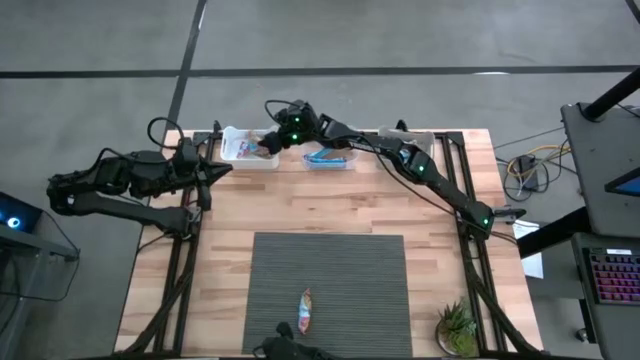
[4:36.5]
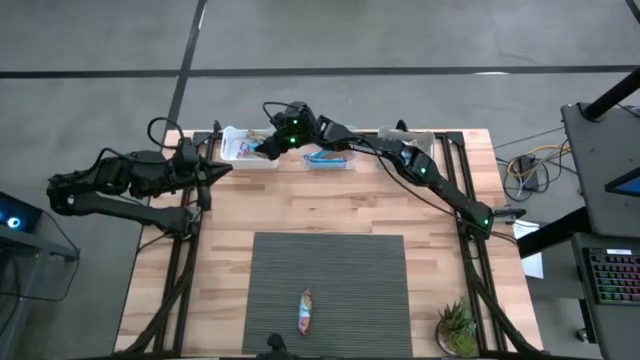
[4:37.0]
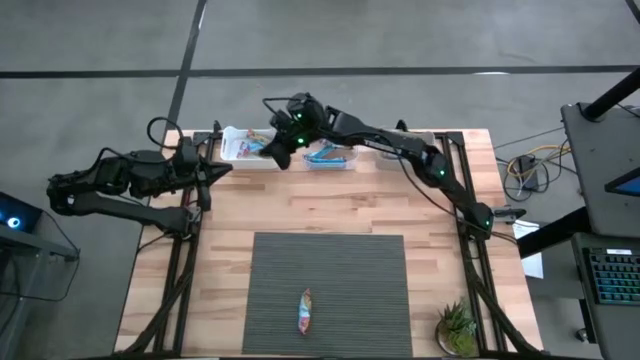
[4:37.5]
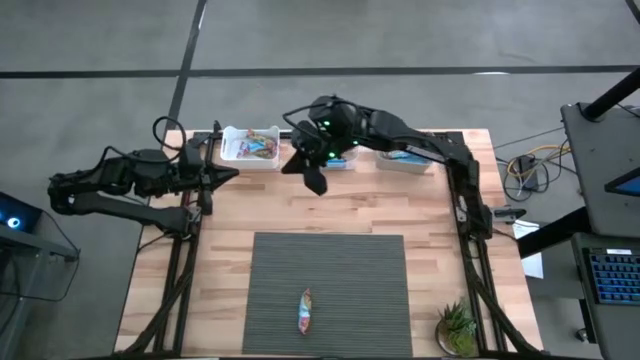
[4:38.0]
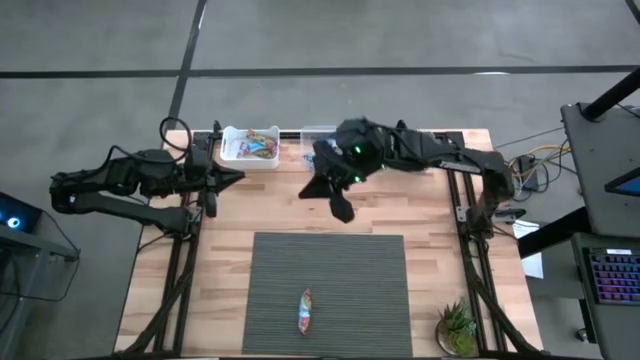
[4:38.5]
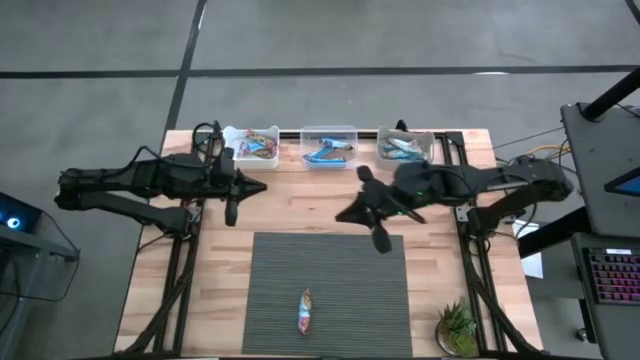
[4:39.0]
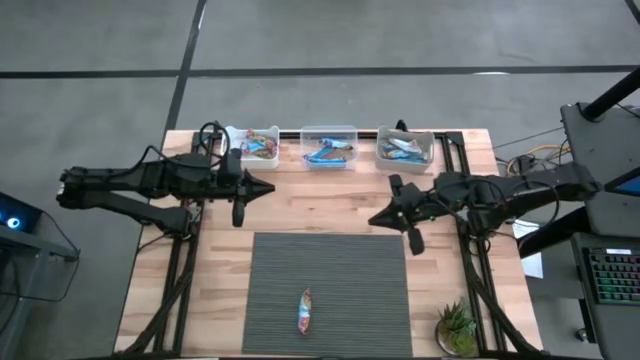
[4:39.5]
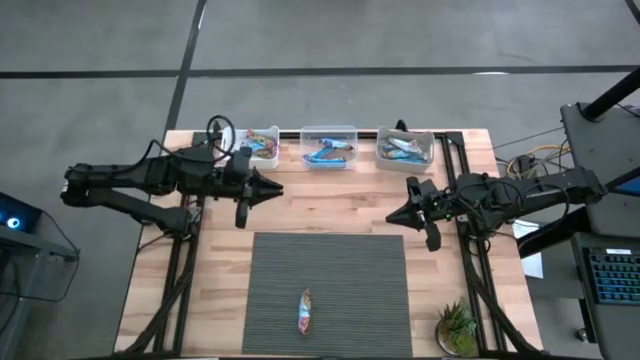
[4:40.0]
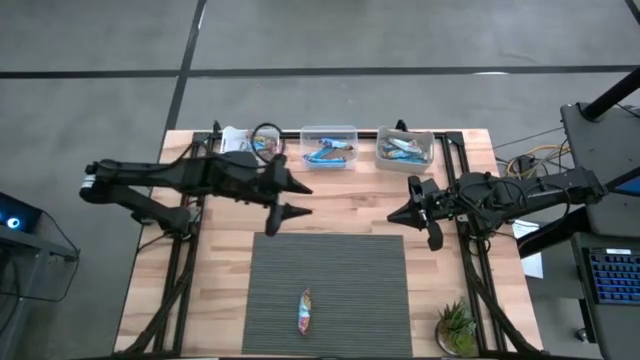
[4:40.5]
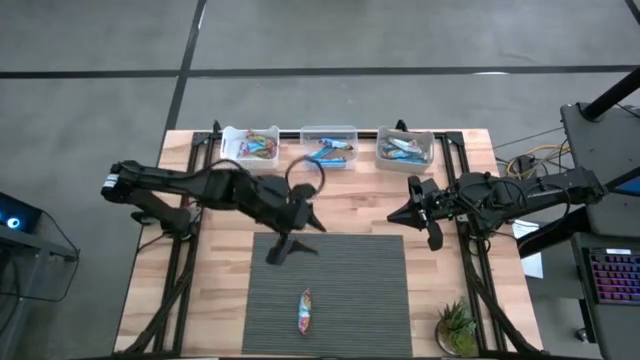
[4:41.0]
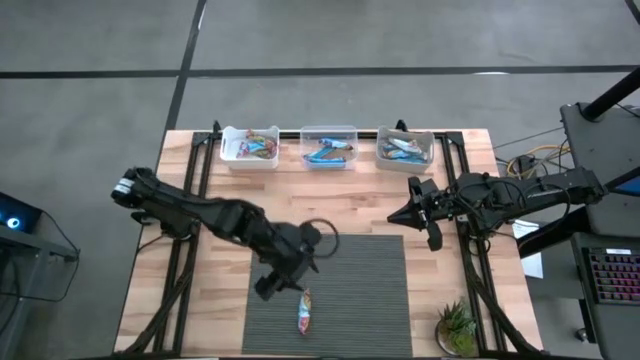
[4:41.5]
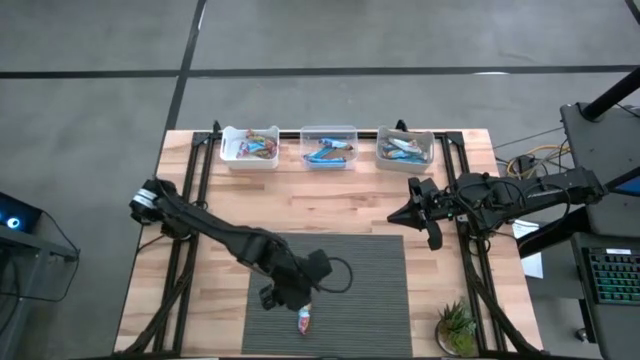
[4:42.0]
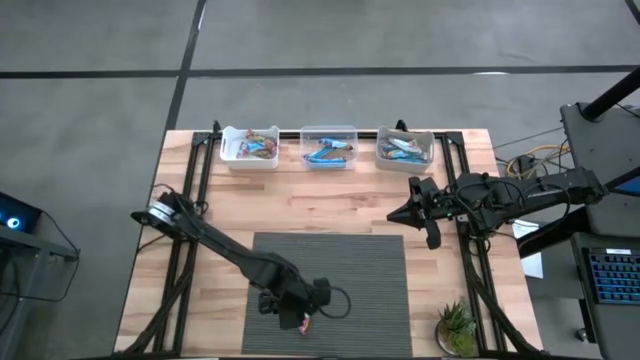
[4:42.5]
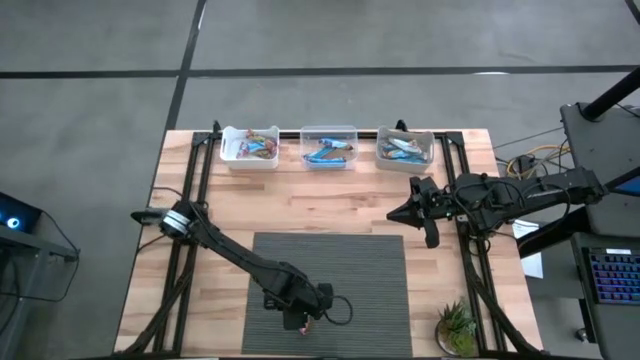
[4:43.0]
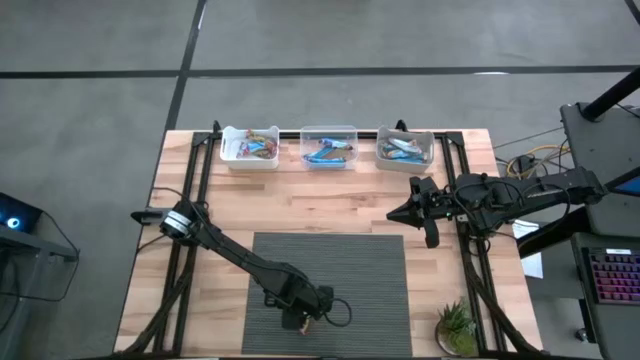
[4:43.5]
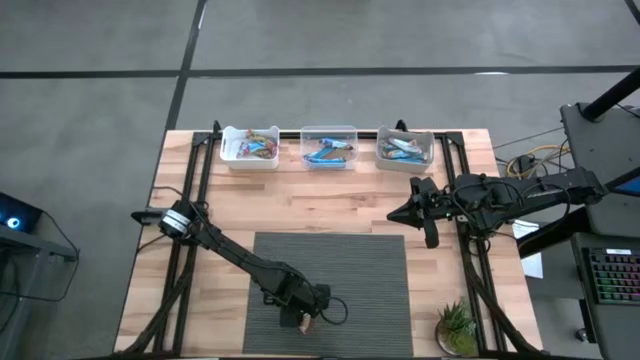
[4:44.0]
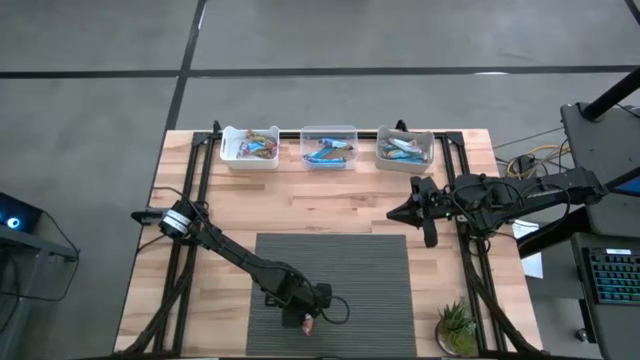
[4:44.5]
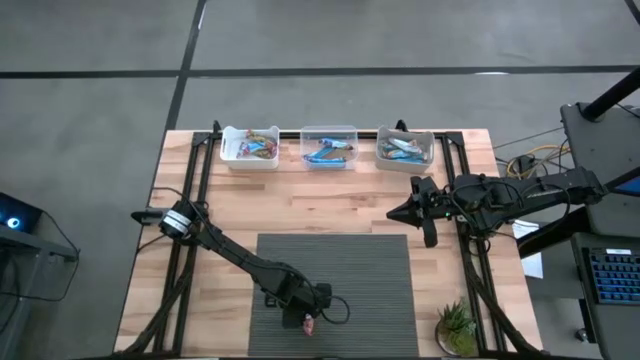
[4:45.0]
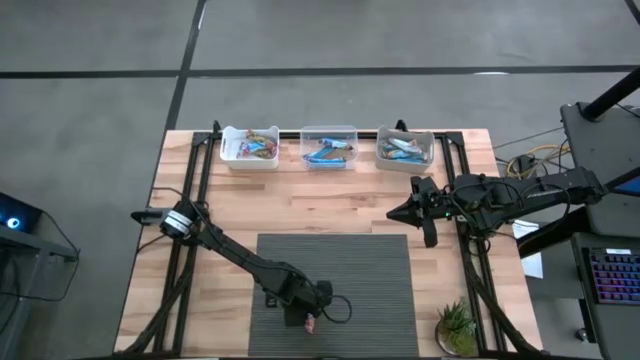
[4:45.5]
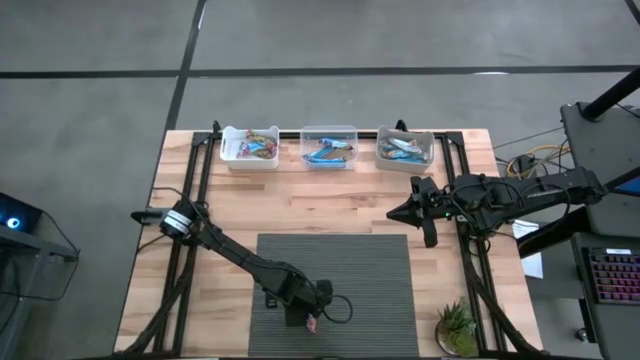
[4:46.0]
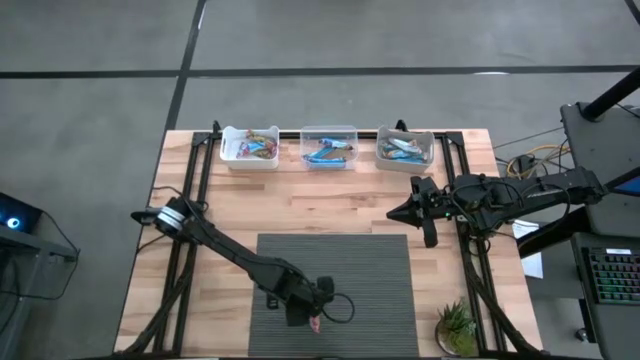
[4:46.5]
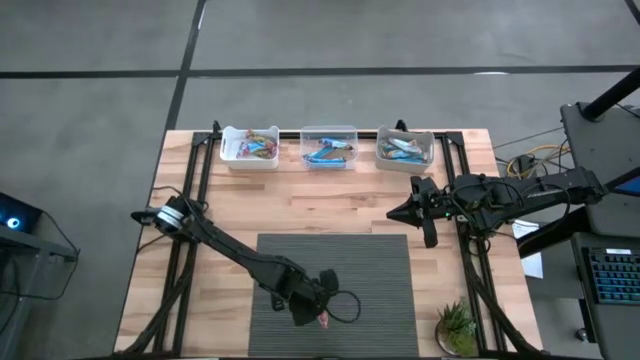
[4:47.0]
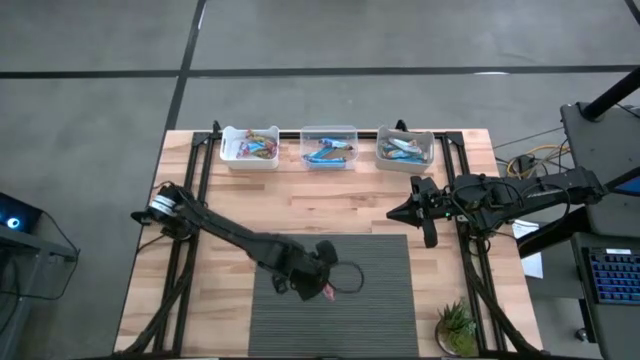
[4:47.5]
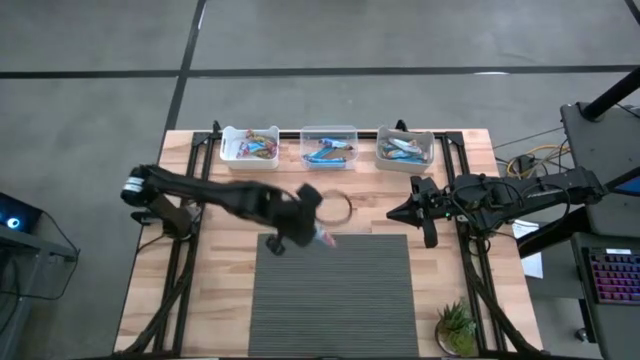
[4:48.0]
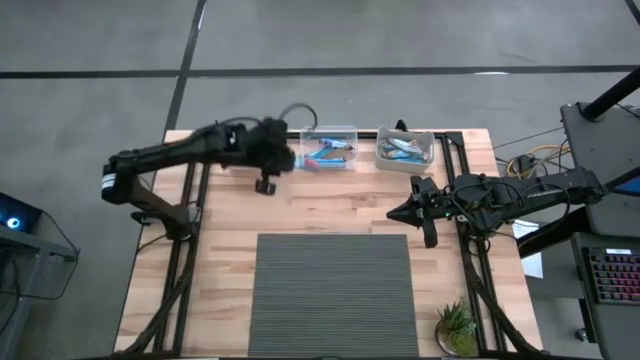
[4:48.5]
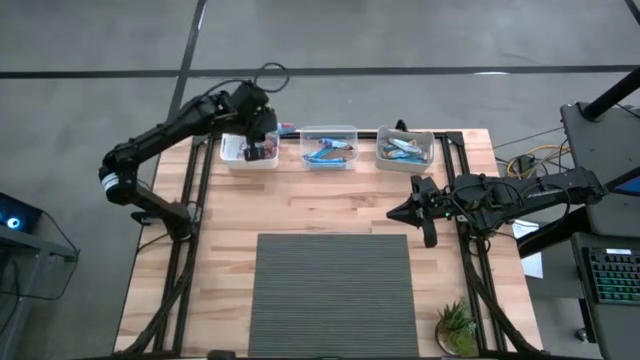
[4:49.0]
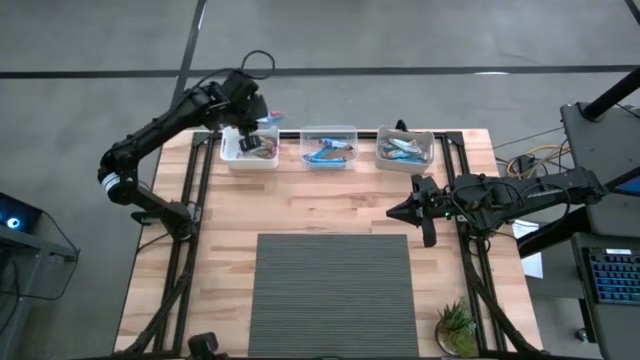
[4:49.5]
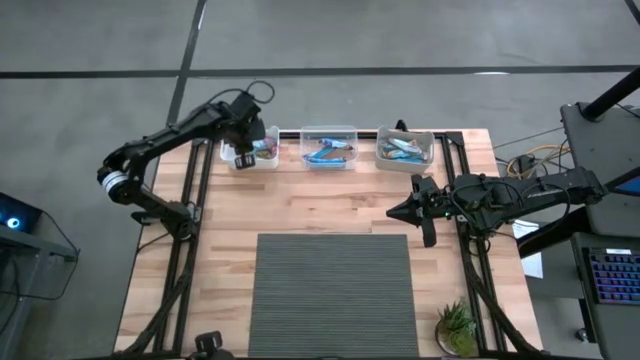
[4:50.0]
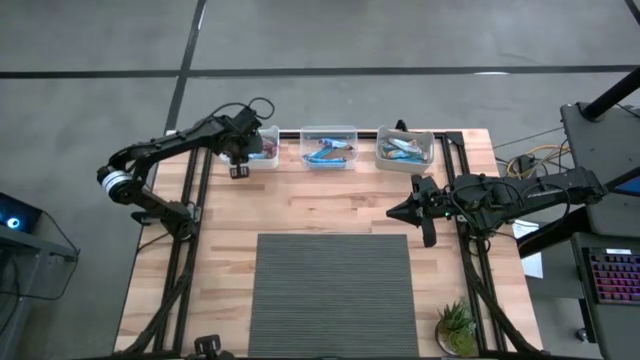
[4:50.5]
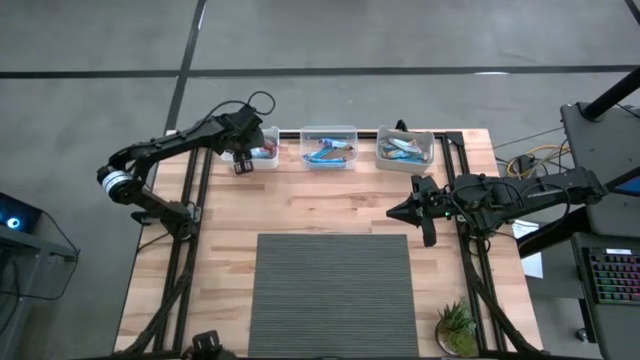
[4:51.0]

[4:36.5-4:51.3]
Task: Pick and place Granola Bars by type
Put the red granola bar into the white bin

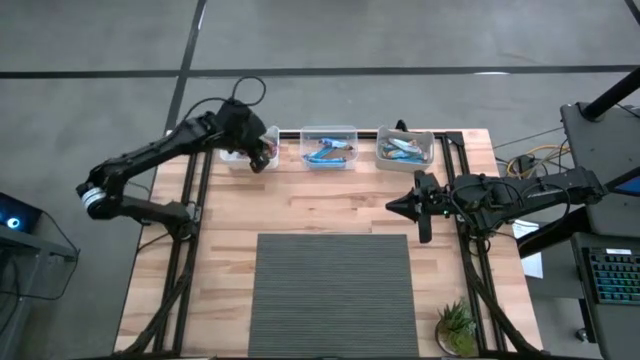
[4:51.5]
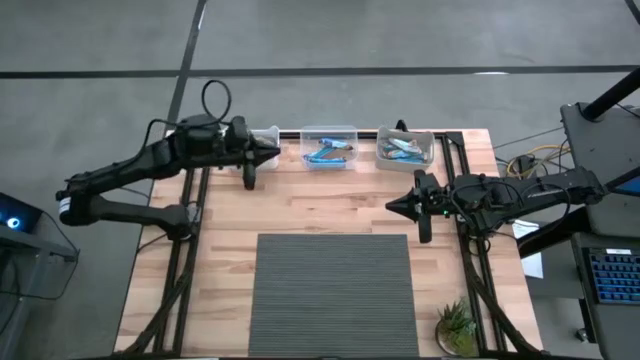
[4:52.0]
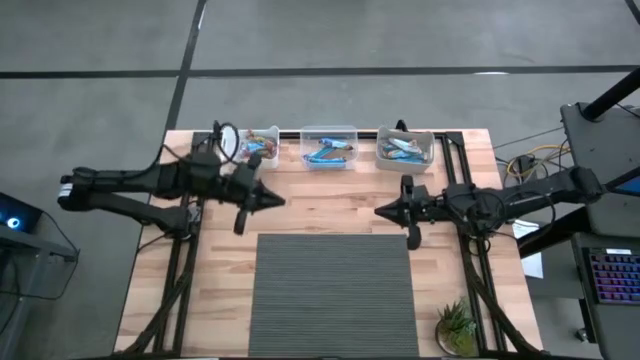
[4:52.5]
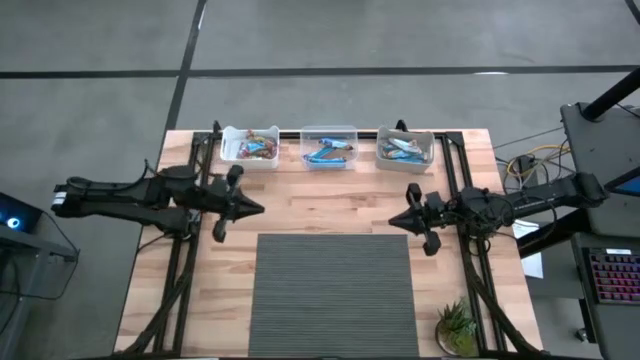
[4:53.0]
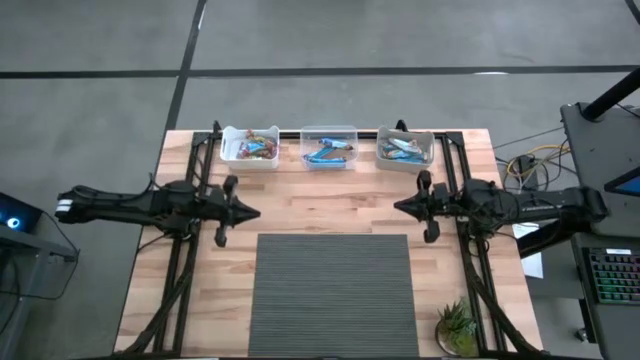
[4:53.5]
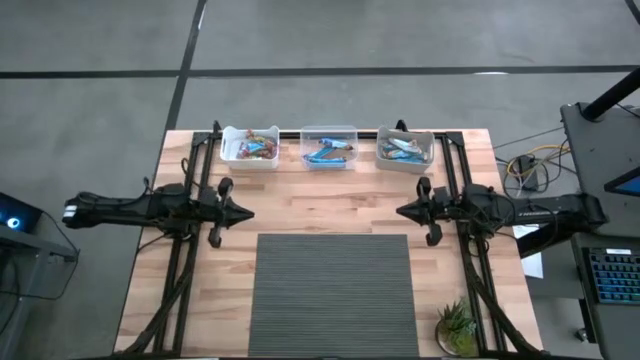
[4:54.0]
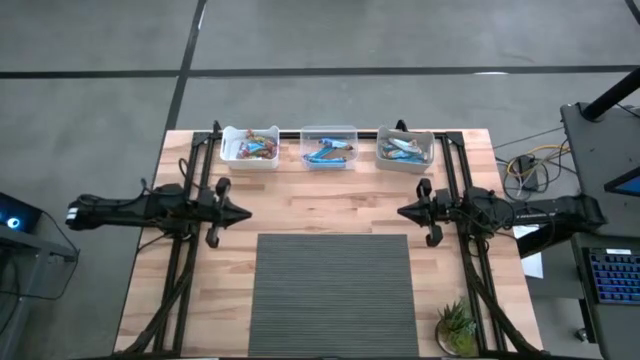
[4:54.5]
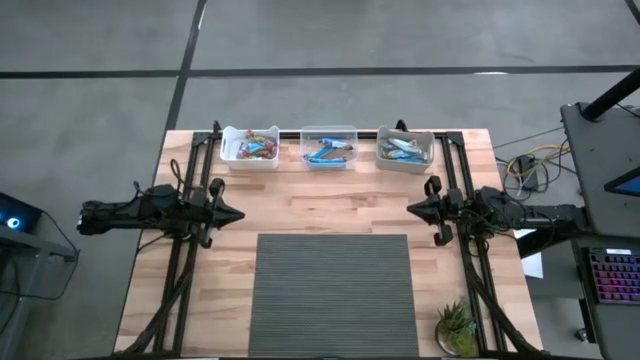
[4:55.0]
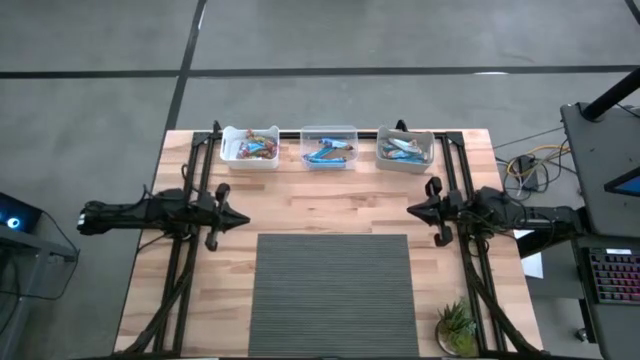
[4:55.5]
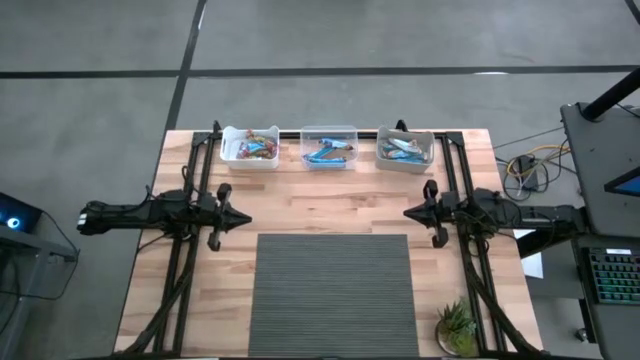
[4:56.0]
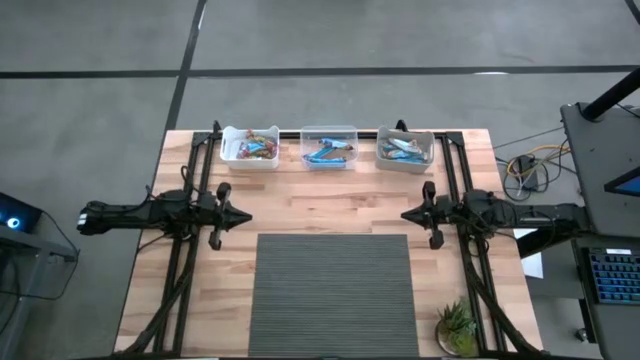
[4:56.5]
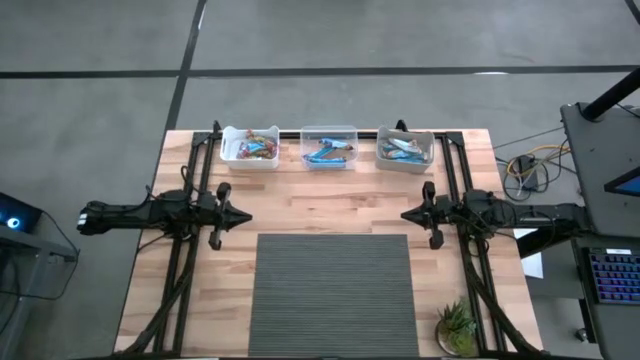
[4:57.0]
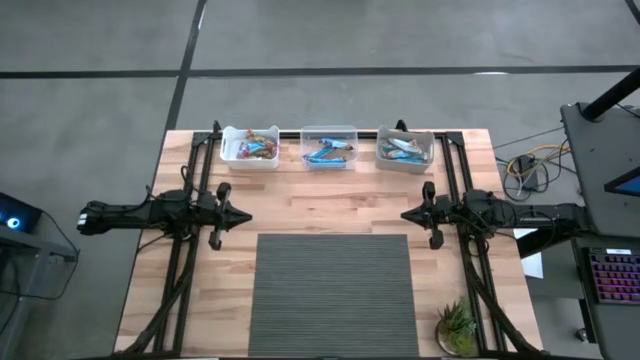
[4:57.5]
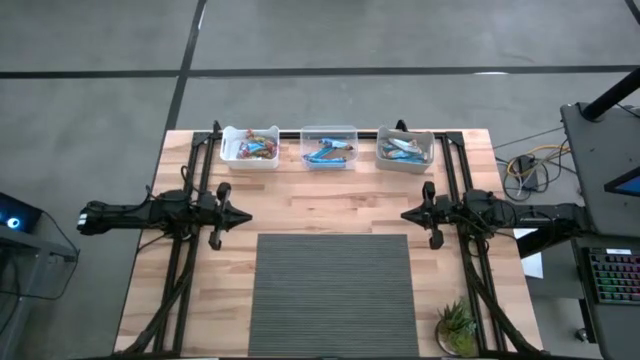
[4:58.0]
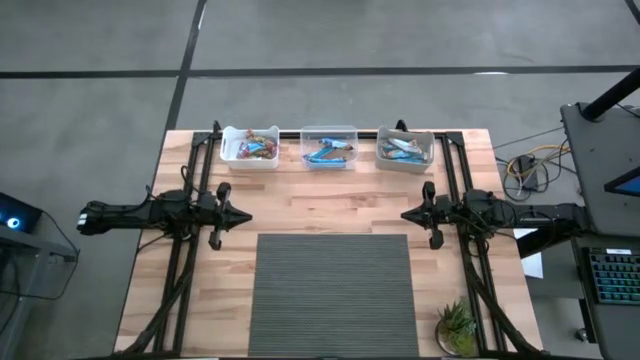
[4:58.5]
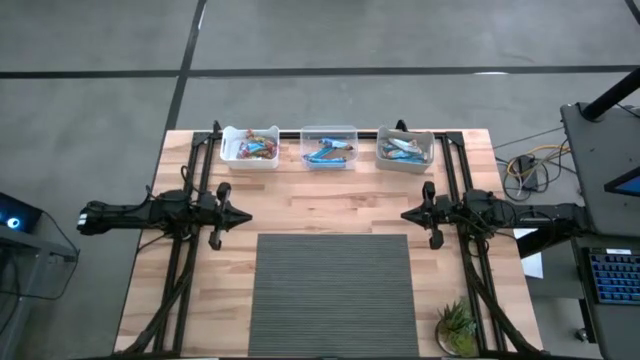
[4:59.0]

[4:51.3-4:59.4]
Return to Home Position
